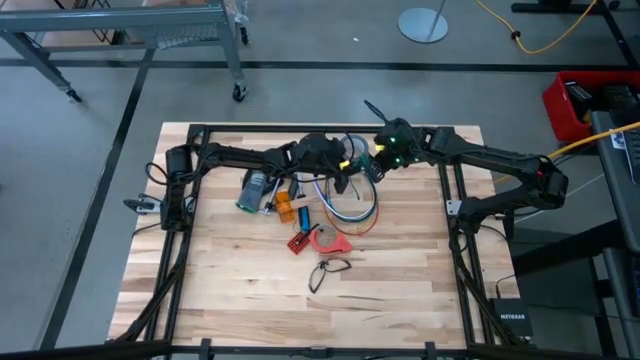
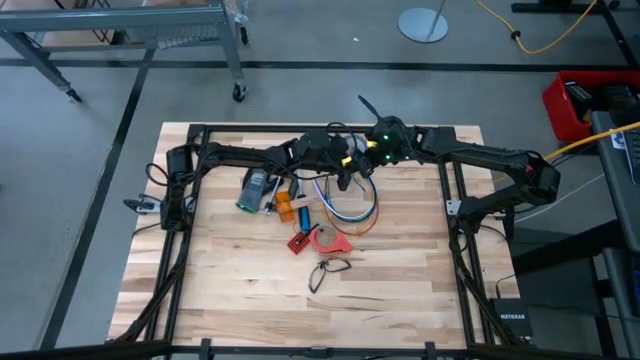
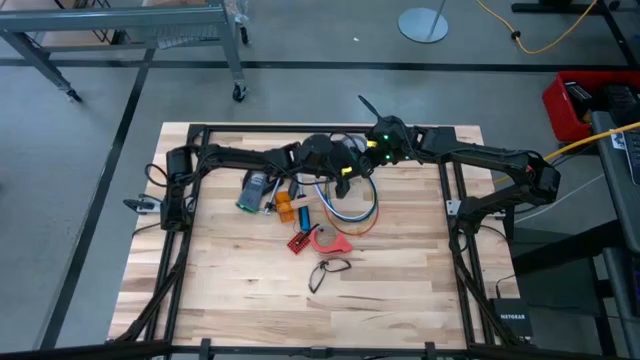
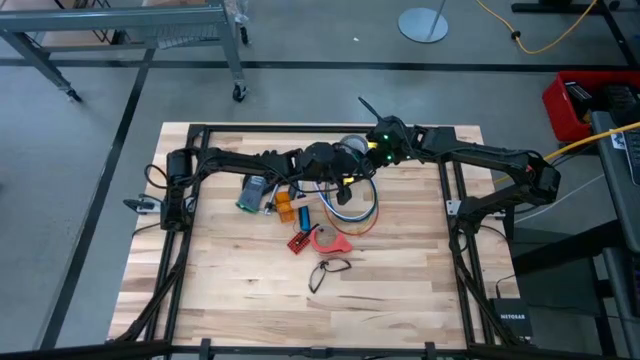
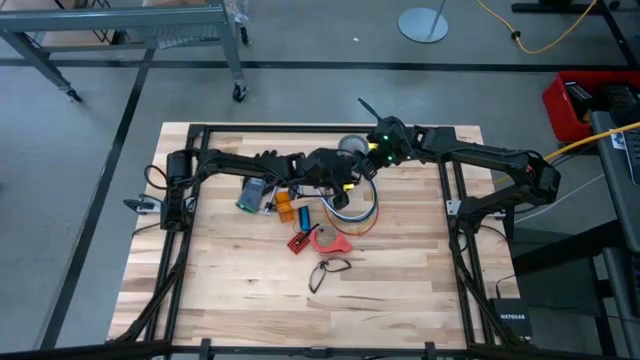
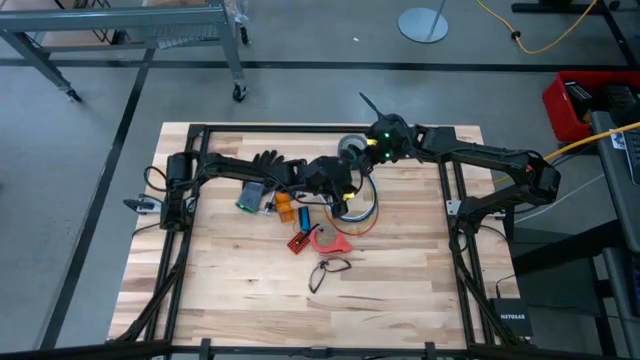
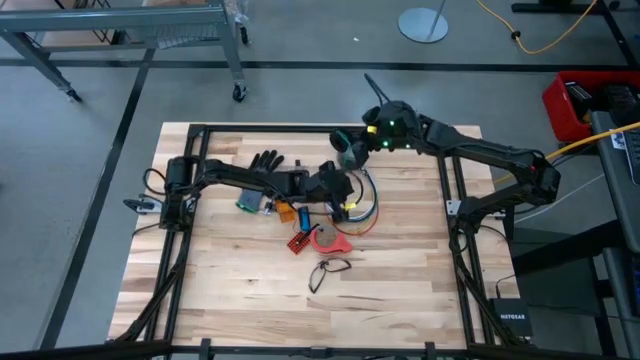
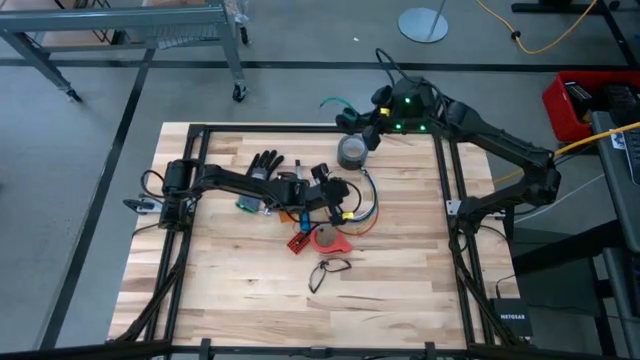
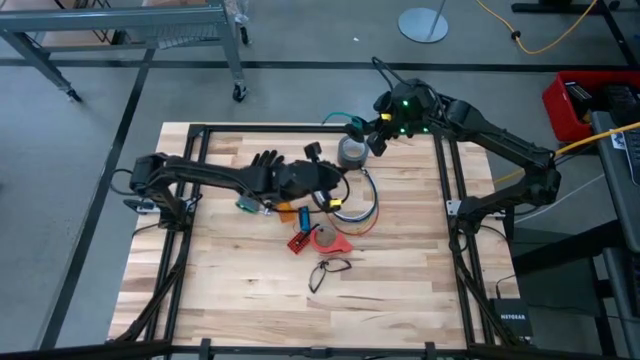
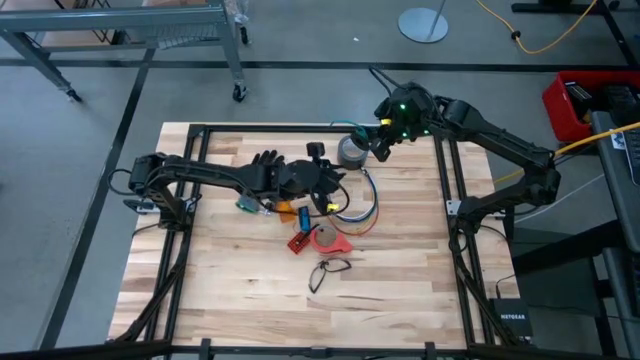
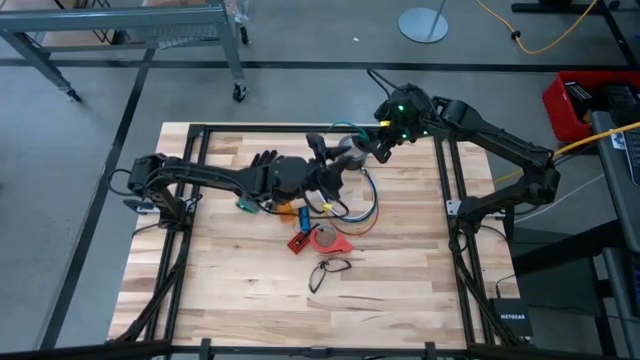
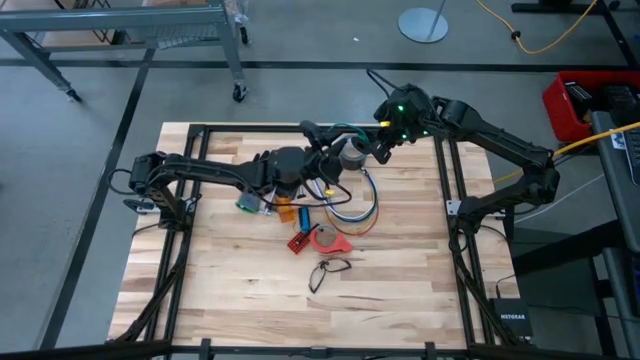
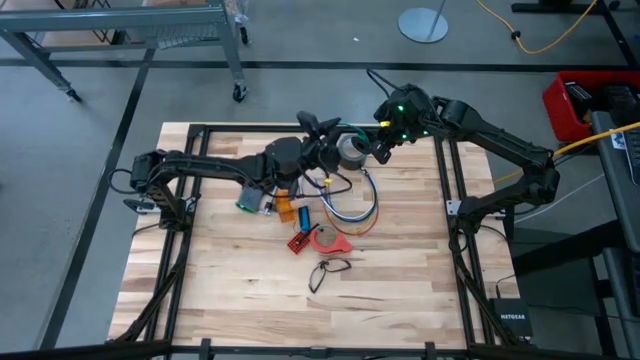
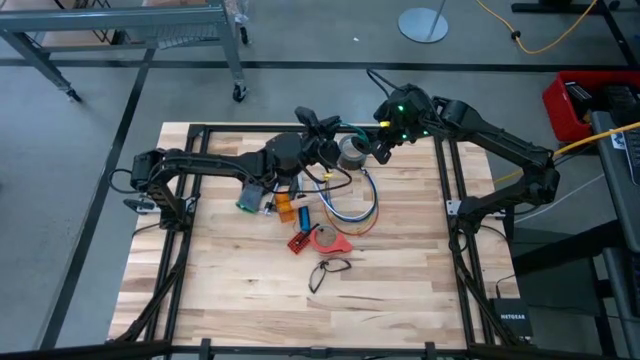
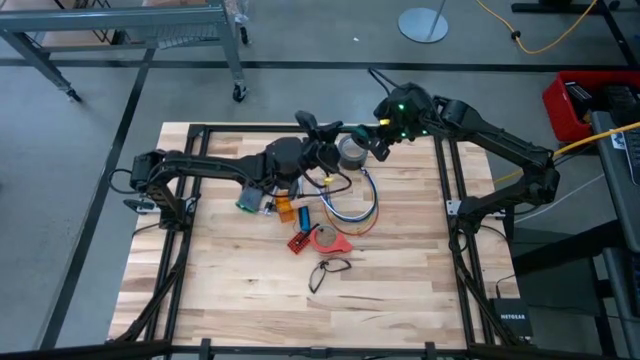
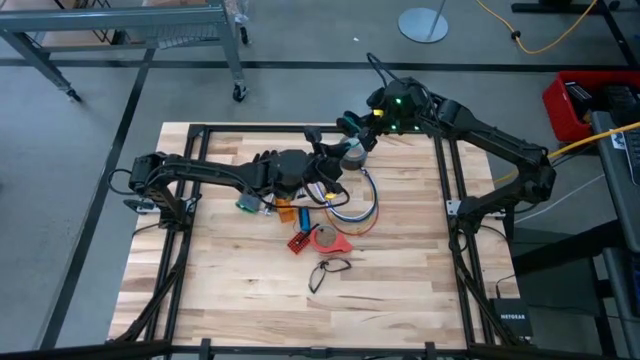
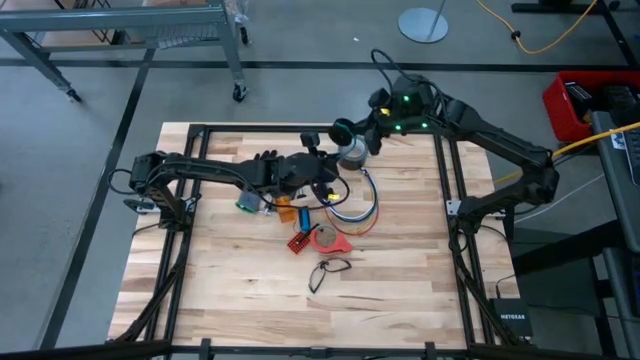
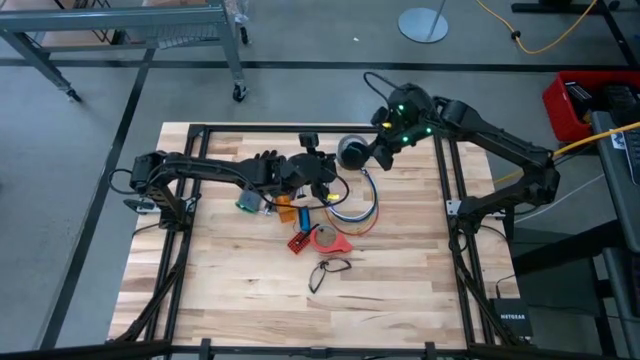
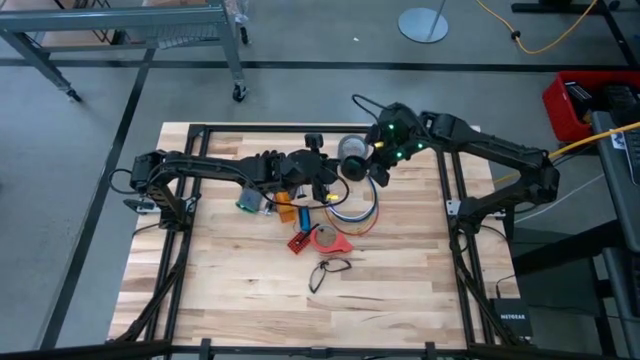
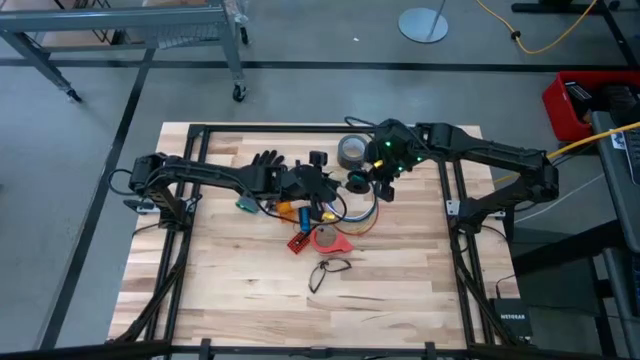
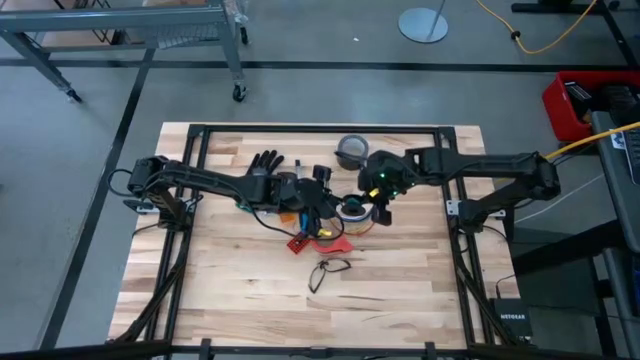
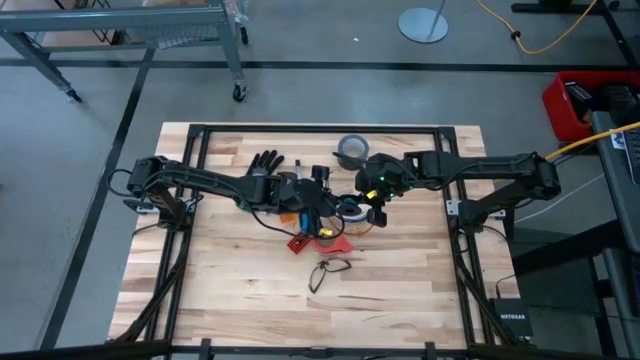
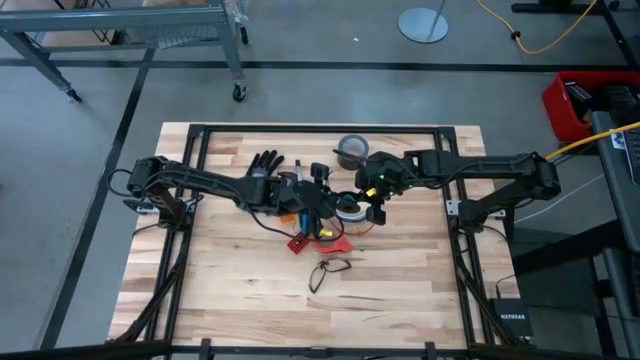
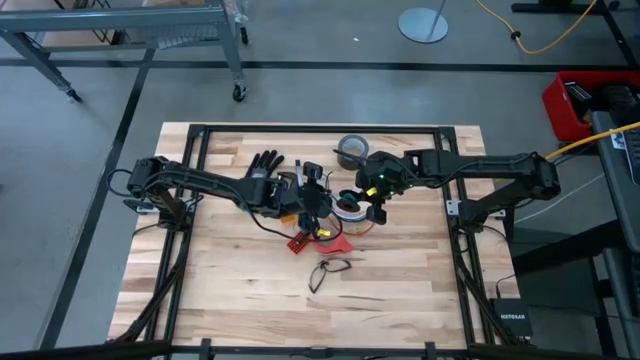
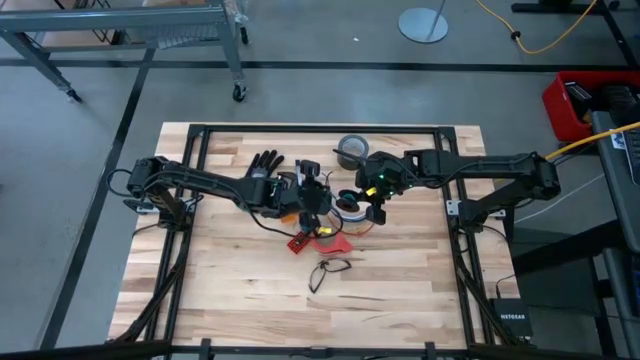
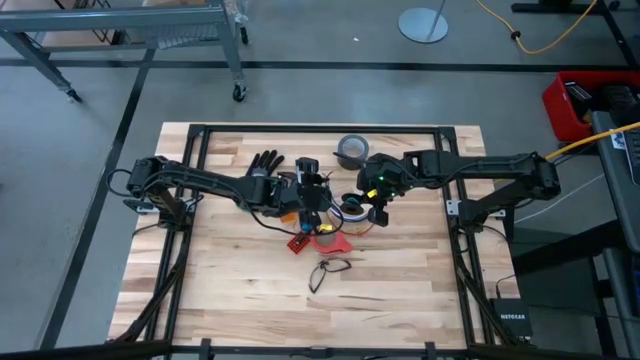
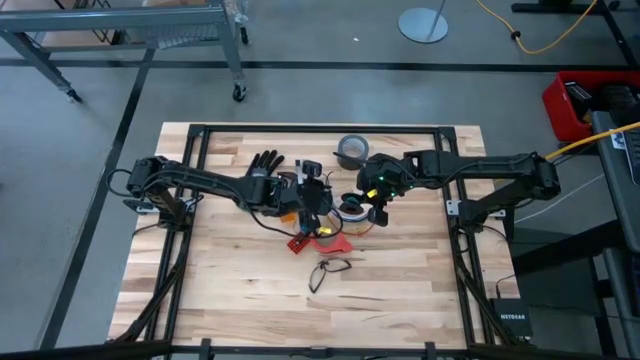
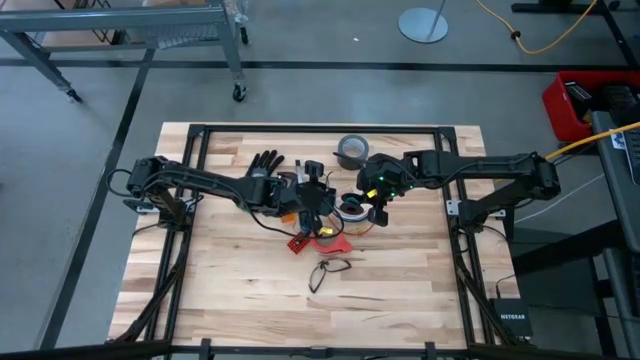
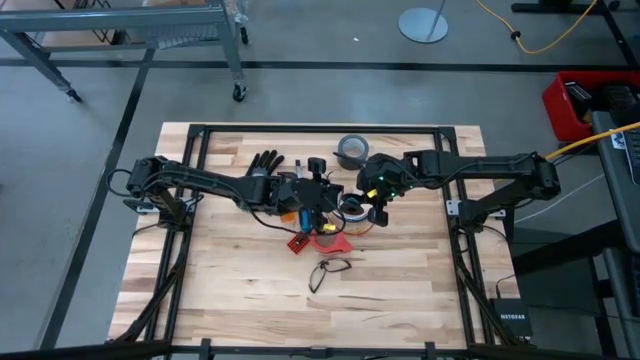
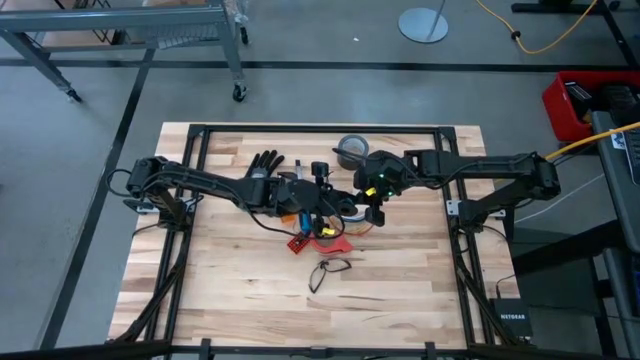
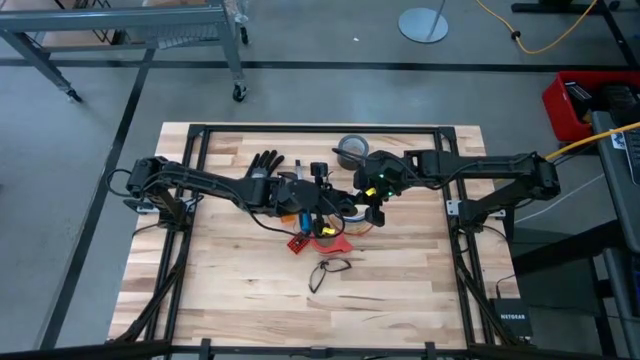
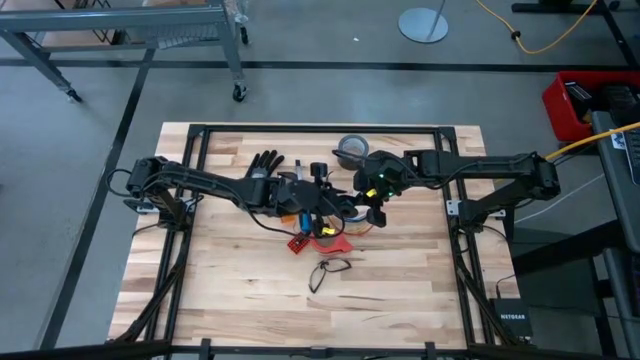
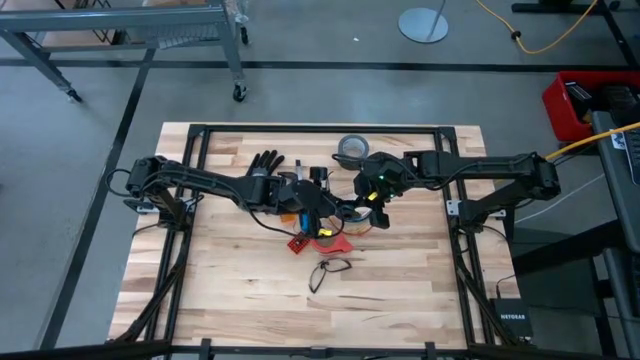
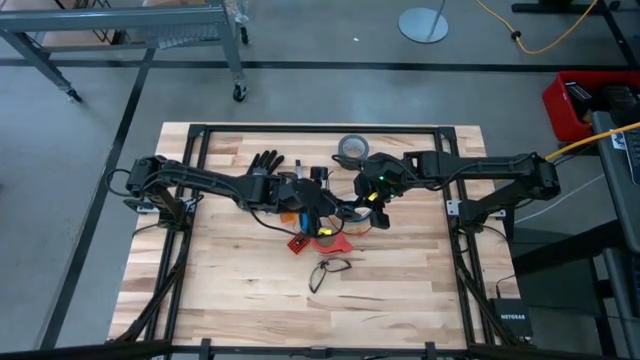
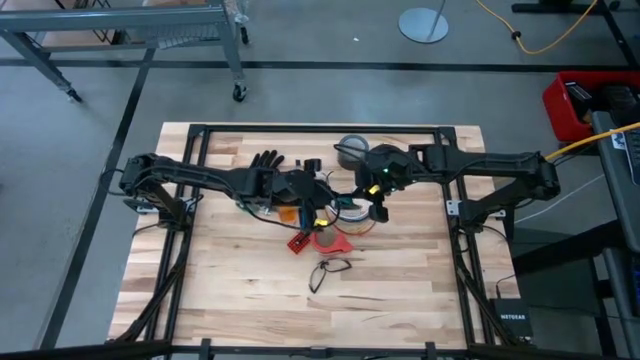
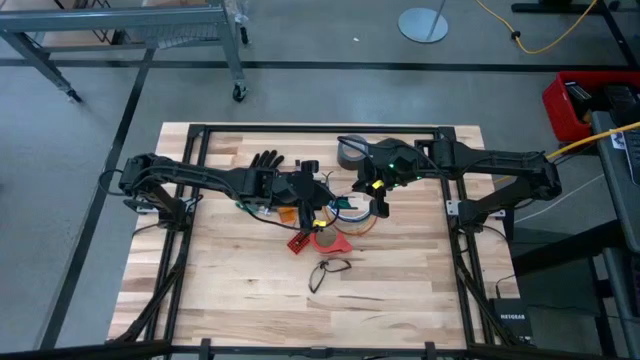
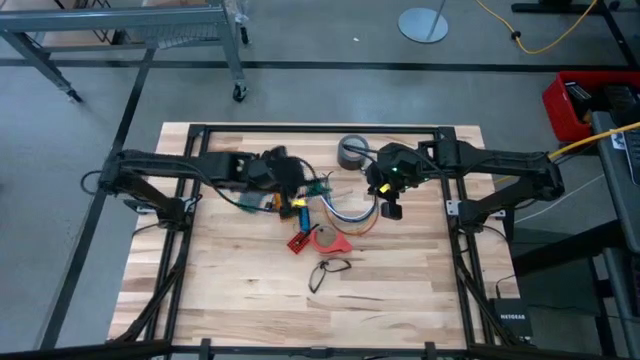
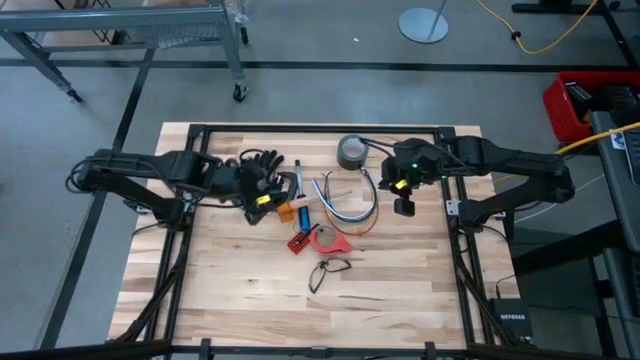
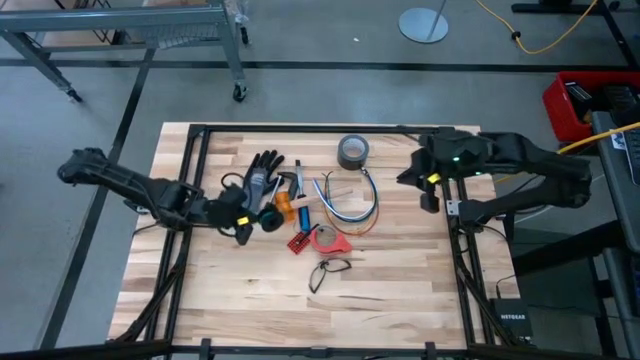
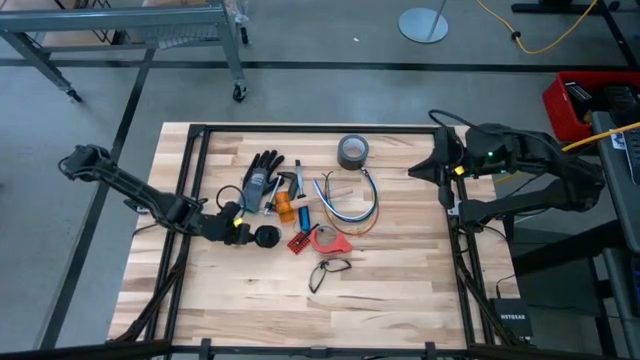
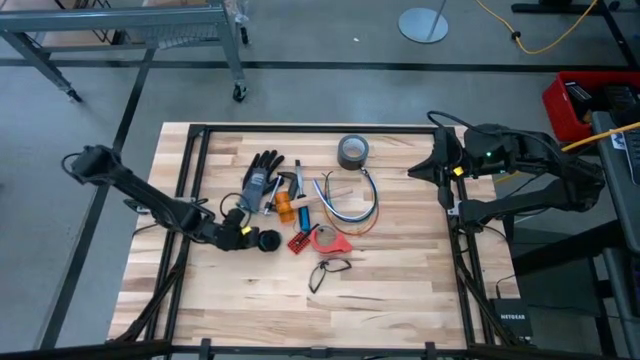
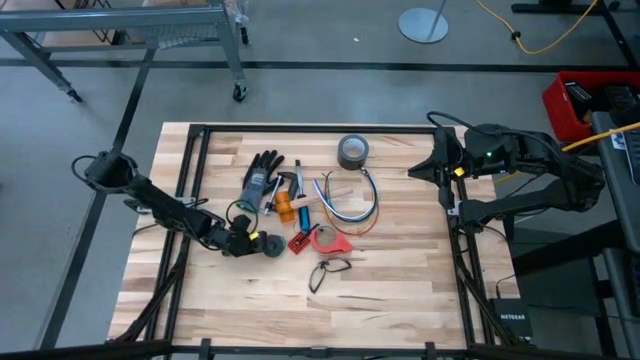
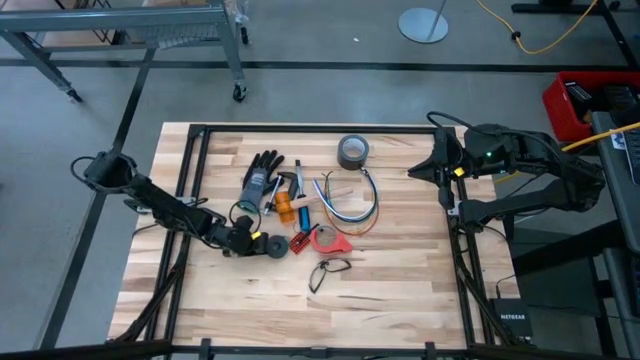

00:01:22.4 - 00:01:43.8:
Task: Coil cords
Coil the green wire on the spool
